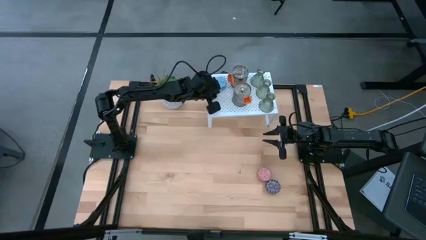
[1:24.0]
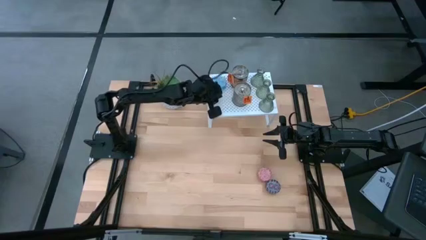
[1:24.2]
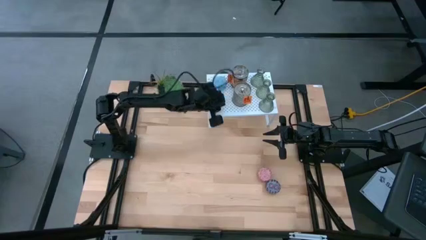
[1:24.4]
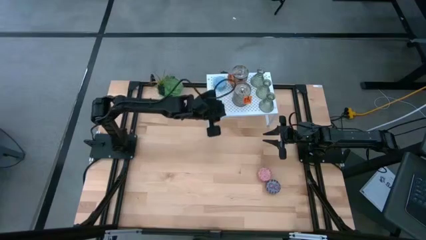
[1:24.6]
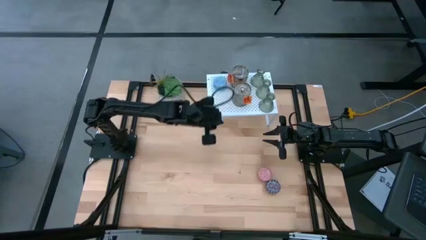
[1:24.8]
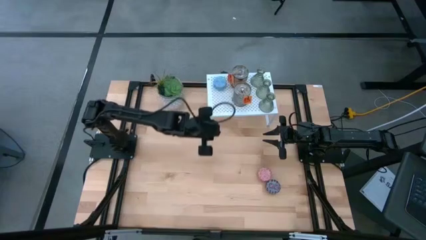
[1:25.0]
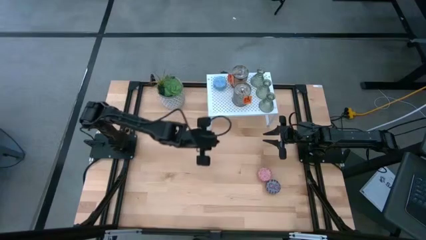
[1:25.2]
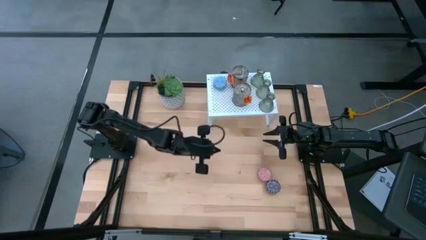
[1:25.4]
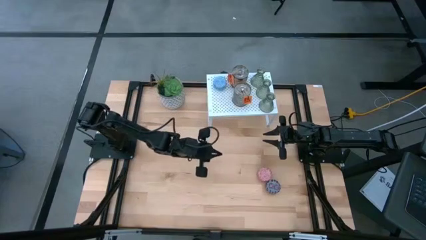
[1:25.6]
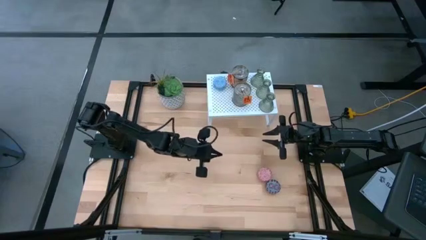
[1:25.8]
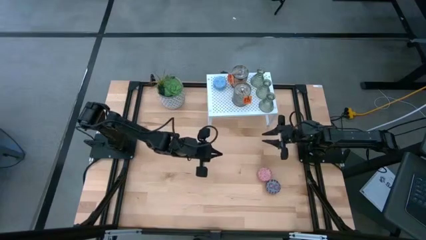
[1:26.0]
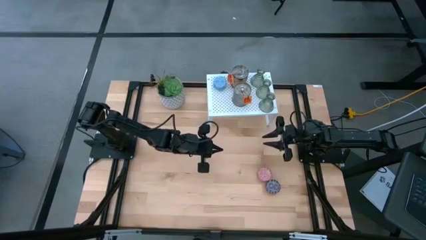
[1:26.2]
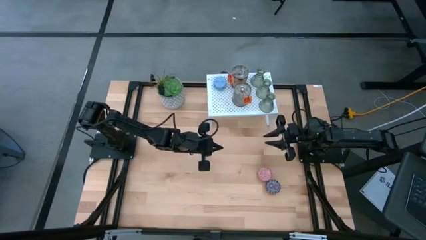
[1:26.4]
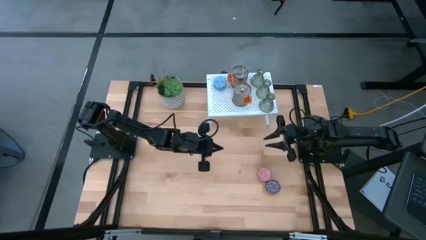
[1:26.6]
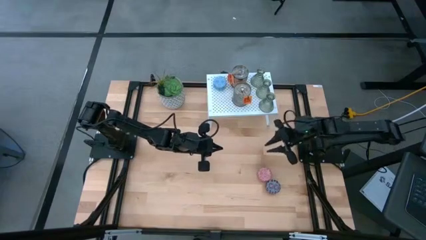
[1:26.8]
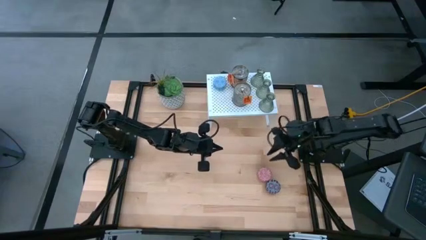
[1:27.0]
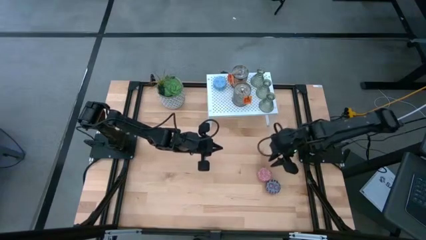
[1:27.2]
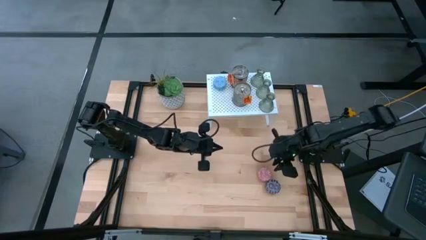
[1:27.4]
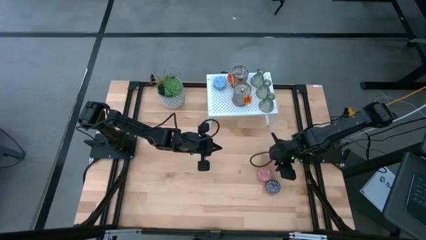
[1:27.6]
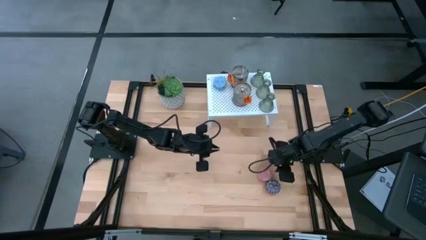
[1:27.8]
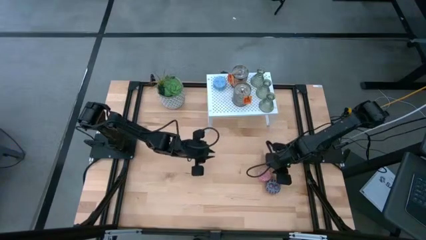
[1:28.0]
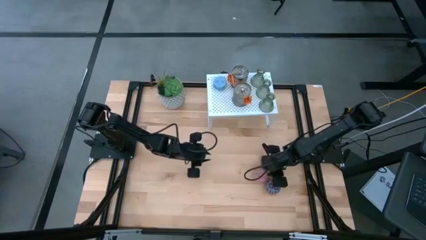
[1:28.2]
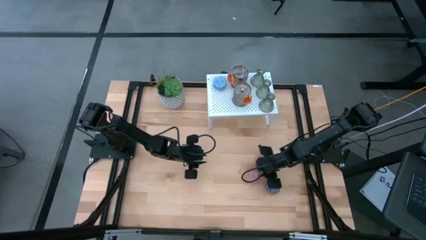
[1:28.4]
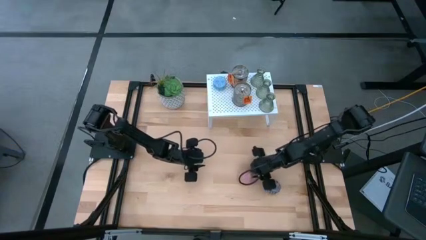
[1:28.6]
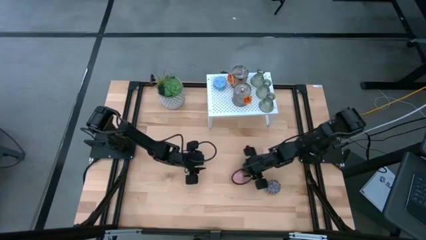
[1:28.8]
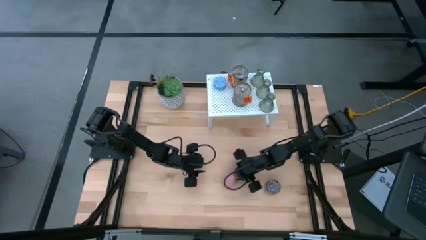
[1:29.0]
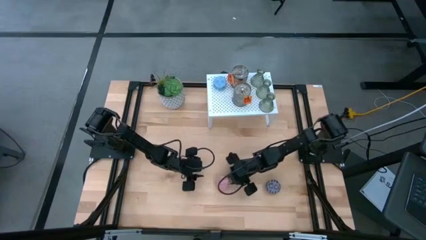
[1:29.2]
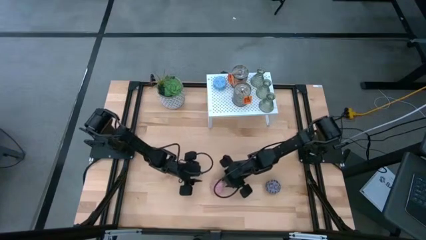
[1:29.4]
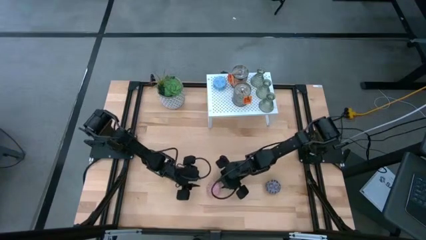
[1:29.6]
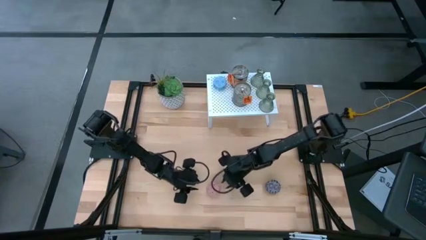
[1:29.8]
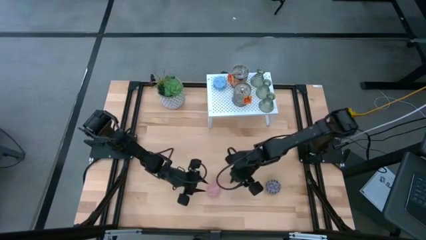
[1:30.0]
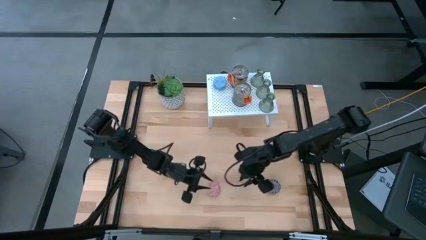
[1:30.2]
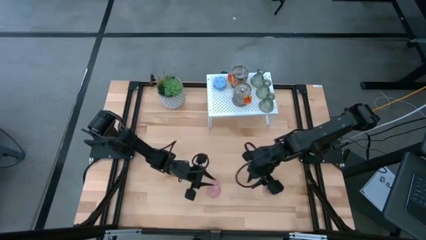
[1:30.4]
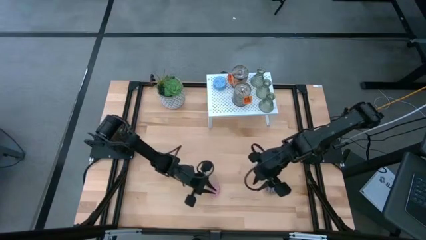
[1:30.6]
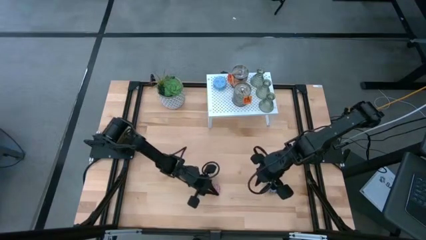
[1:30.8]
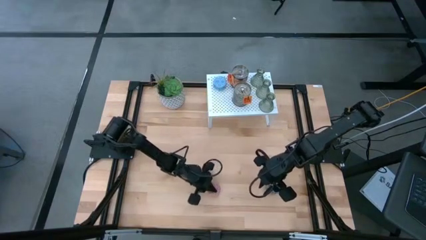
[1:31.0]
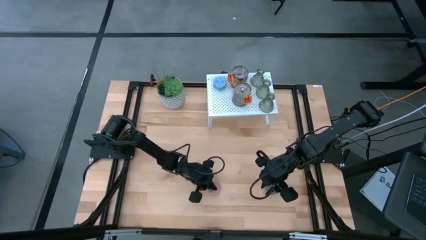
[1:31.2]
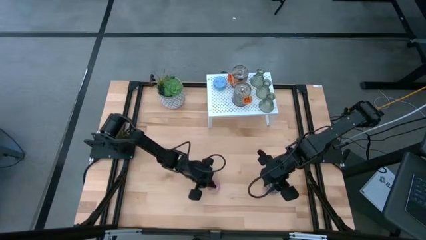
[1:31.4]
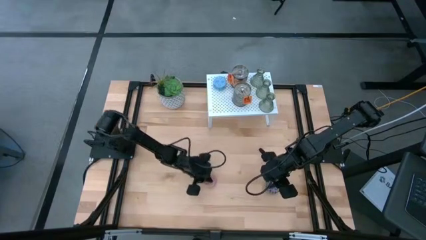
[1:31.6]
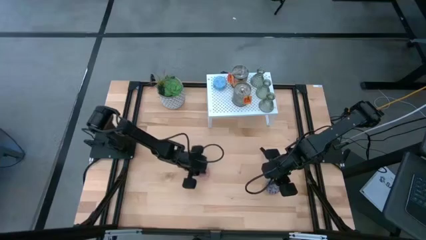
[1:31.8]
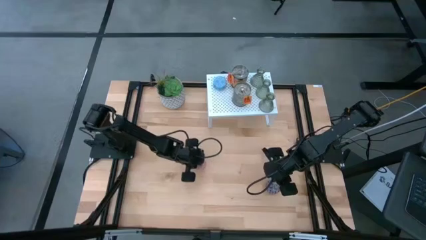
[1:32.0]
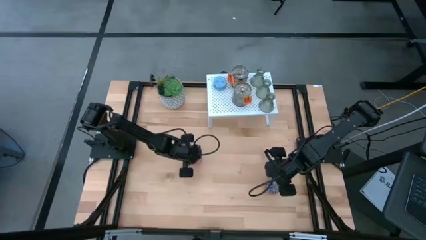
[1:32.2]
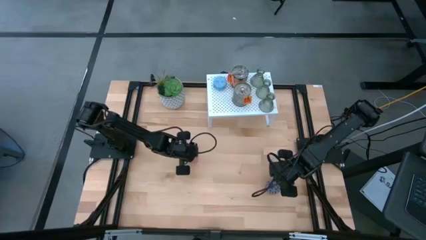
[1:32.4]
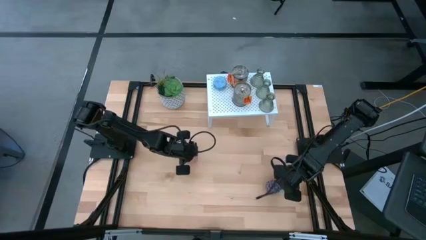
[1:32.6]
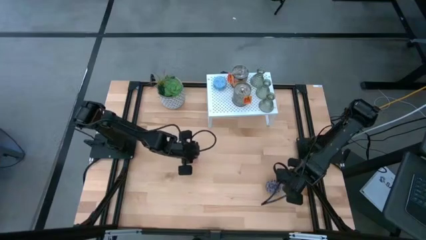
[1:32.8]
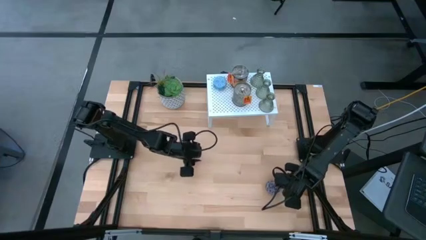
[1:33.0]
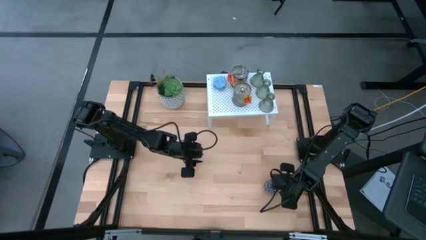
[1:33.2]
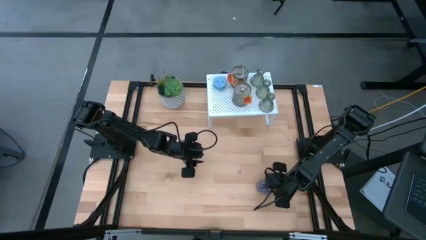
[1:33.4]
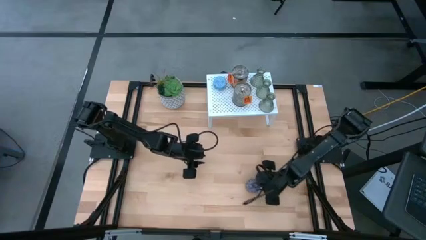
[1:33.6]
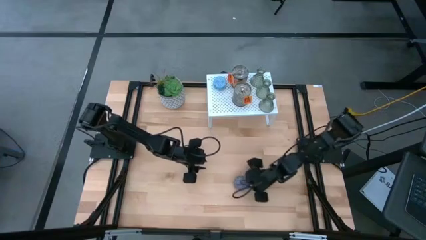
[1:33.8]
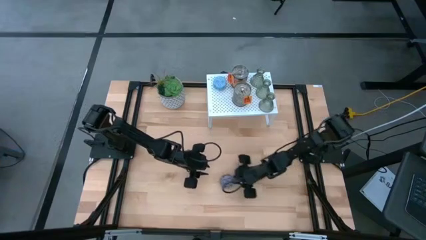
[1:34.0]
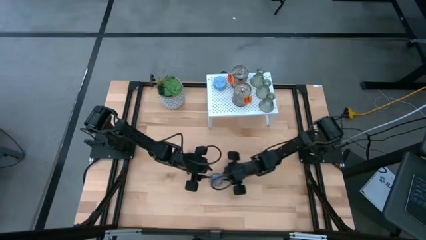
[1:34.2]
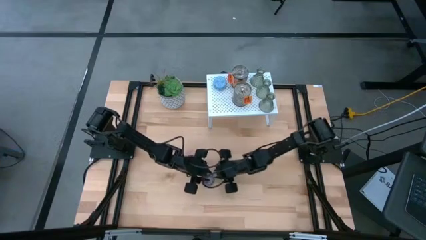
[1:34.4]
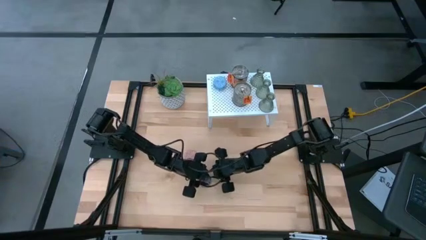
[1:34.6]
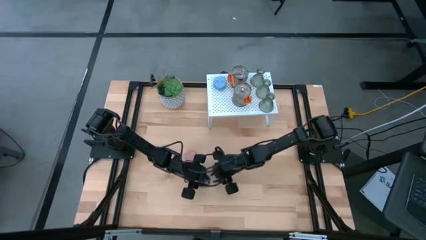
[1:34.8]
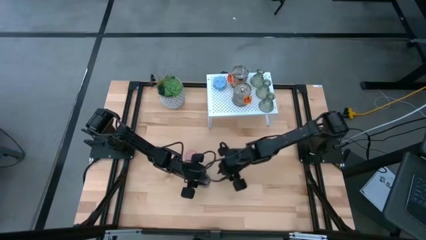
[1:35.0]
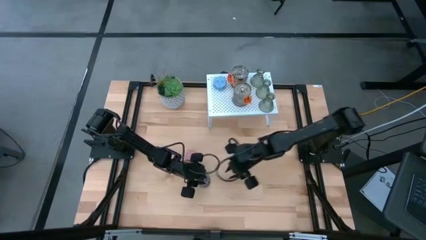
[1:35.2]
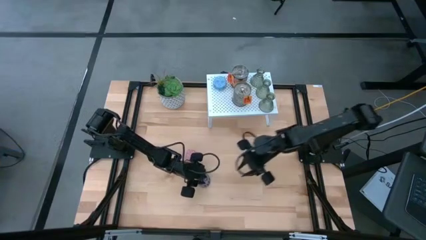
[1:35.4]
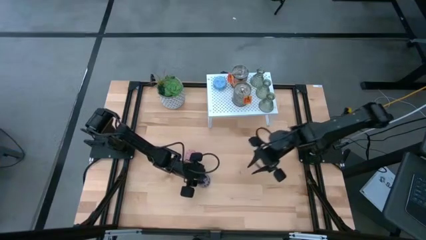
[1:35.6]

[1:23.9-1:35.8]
Task: Pick & Place candle stick holders
Adjust the scented candles on the table

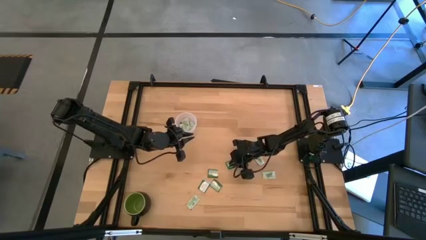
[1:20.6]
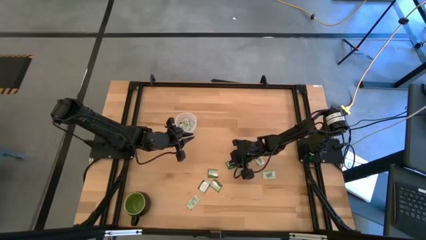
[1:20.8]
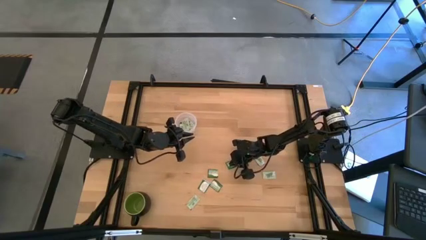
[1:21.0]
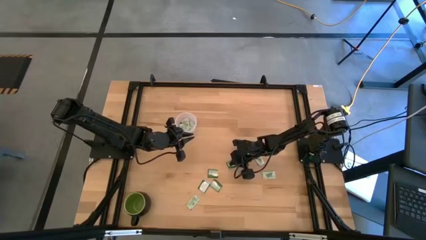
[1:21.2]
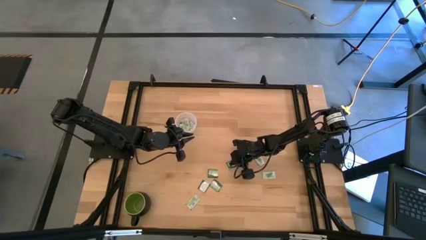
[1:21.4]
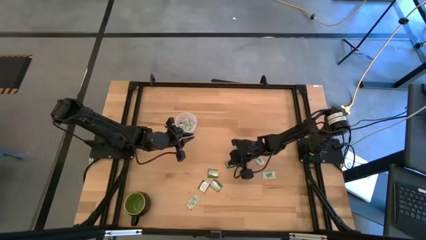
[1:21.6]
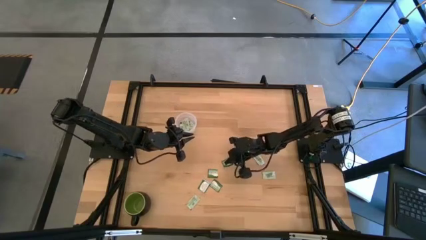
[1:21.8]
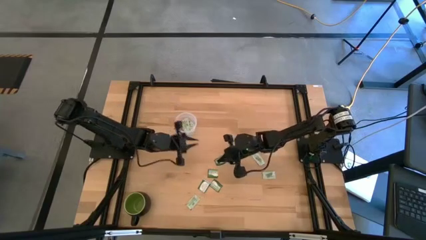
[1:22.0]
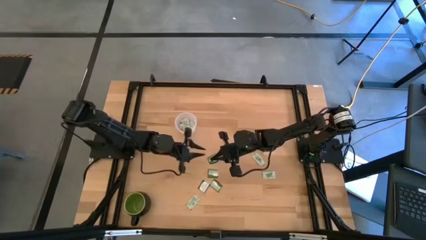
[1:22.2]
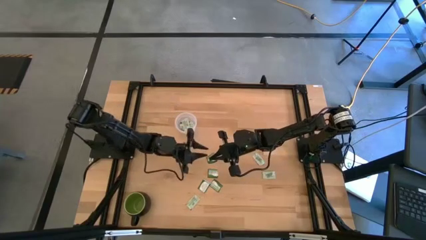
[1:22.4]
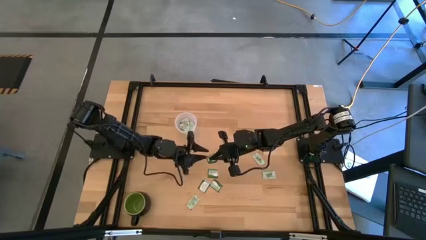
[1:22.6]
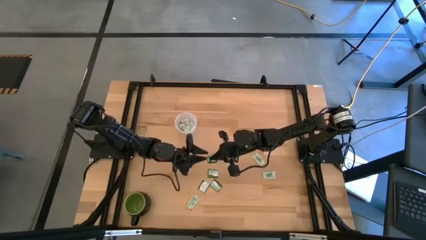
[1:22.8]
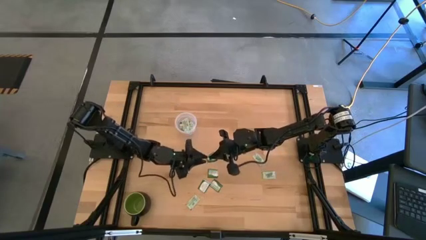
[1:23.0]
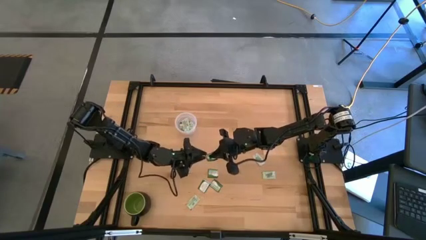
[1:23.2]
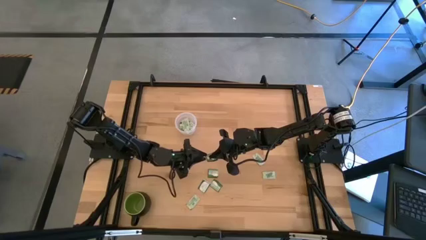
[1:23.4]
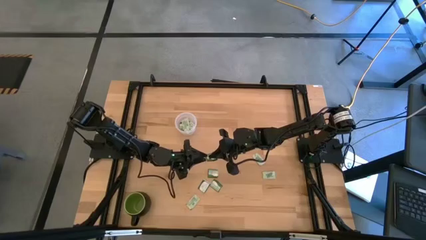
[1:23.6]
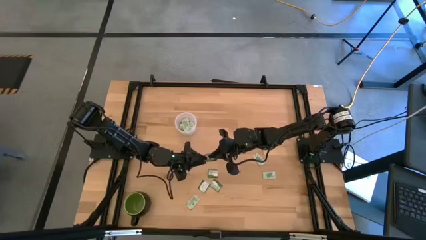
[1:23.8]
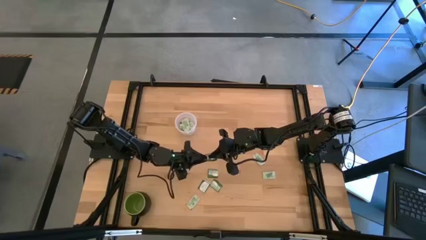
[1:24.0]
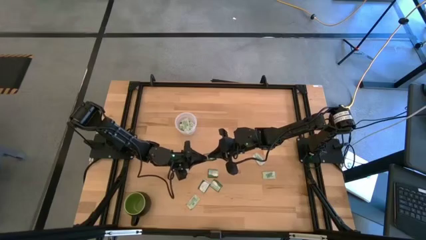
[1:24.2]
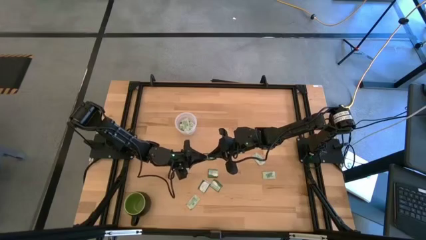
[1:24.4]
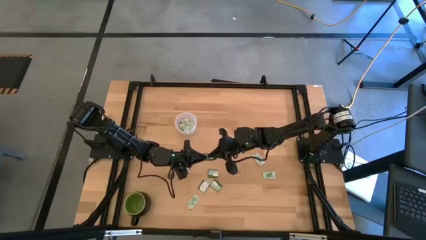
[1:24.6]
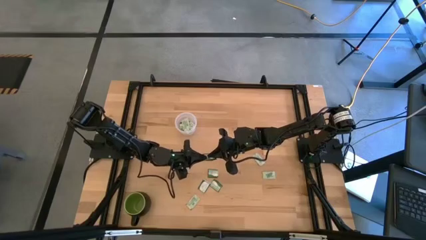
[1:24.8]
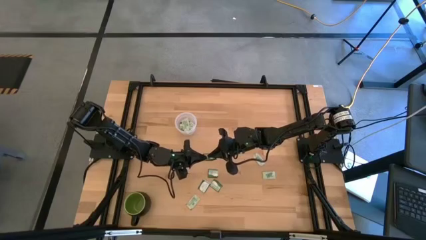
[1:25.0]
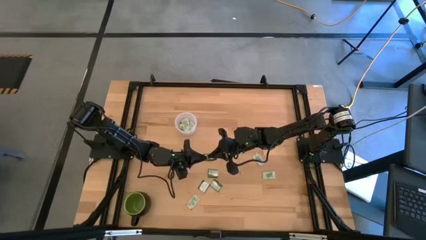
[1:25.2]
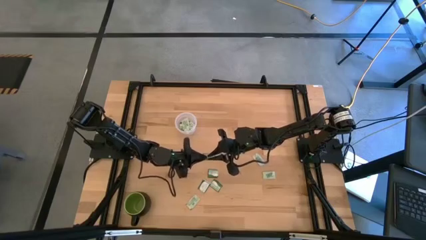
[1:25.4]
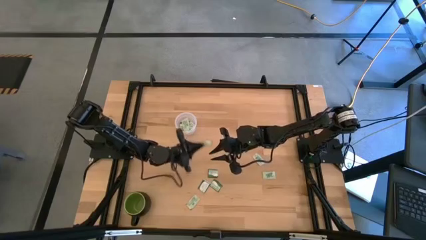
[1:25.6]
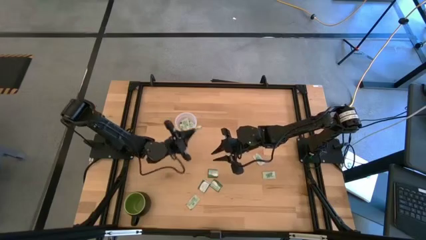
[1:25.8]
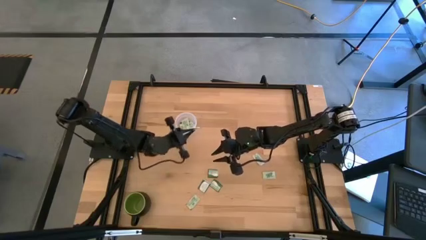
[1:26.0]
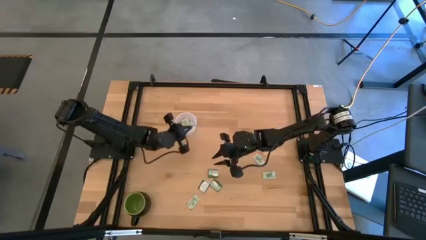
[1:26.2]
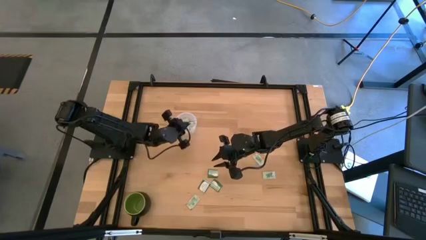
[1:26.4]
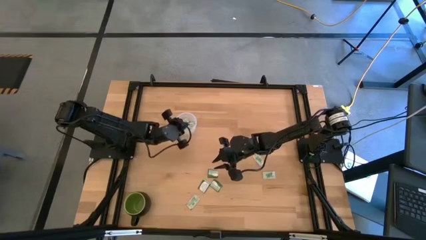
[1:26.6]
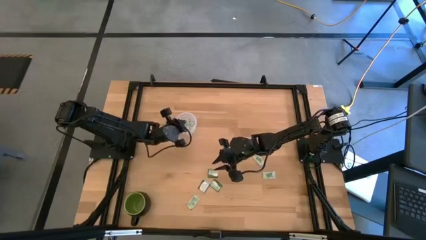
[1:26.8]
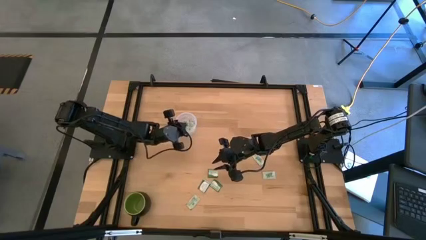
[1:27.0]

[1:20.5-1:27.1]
Task: Pick and place Stevia / Truvia into bins
Put the green stevia packet into the transparent container
